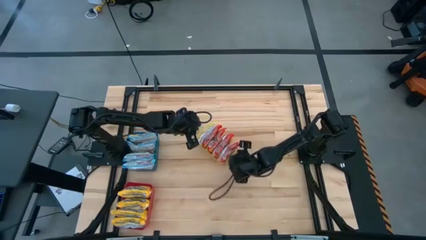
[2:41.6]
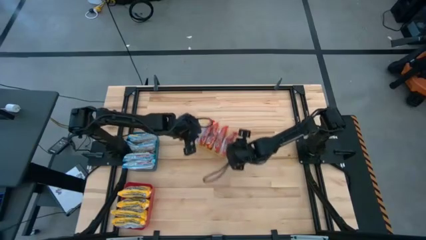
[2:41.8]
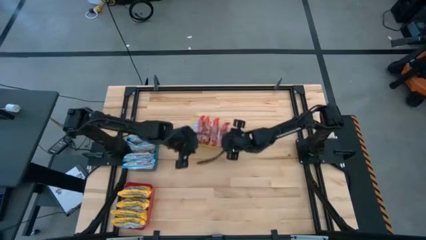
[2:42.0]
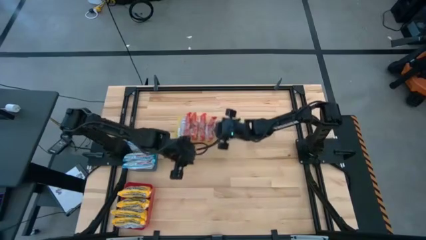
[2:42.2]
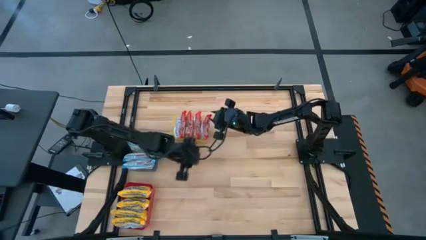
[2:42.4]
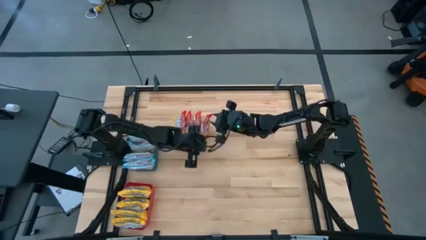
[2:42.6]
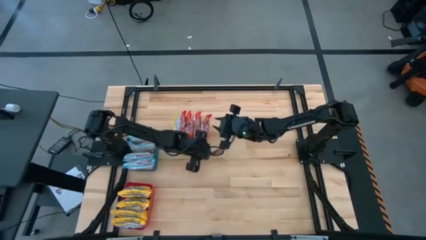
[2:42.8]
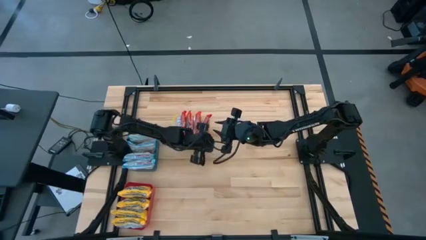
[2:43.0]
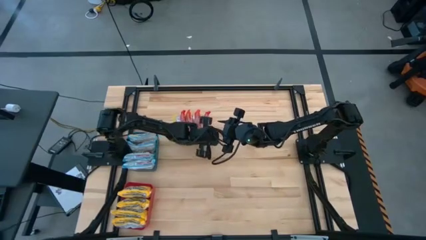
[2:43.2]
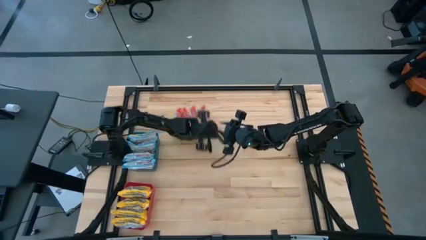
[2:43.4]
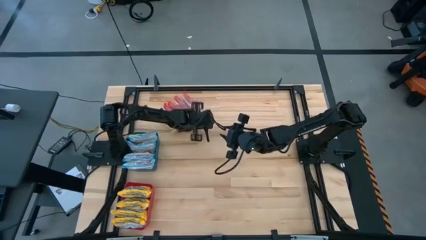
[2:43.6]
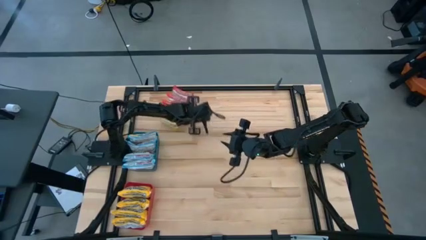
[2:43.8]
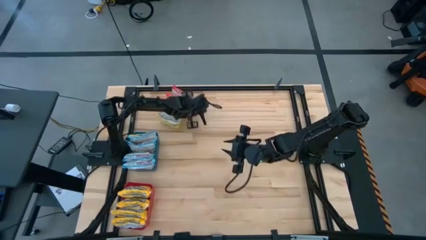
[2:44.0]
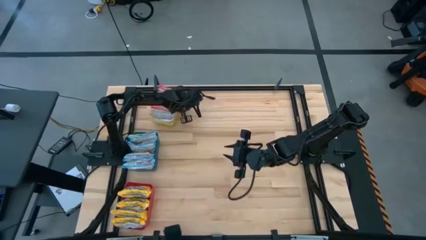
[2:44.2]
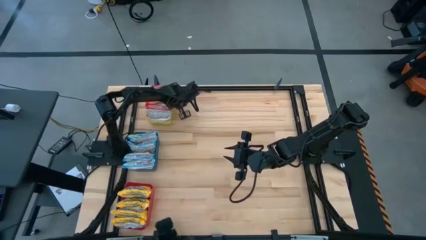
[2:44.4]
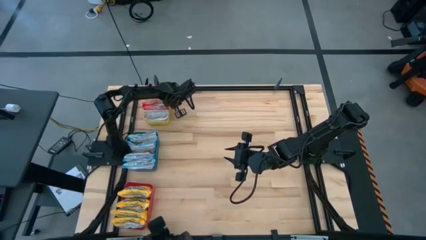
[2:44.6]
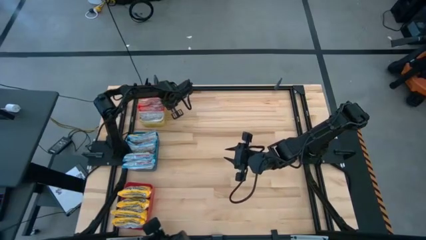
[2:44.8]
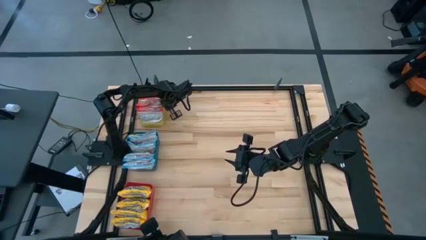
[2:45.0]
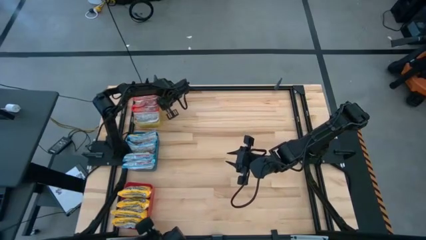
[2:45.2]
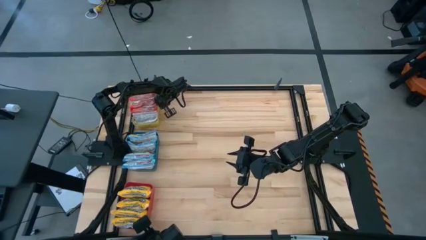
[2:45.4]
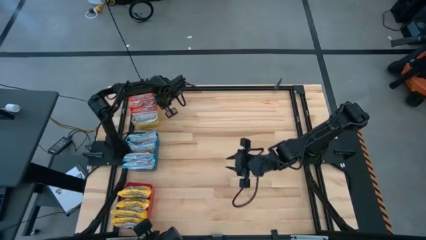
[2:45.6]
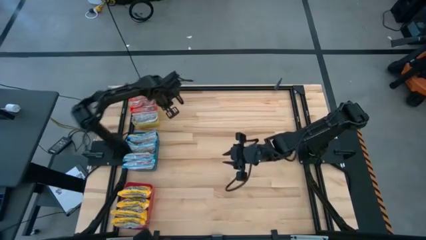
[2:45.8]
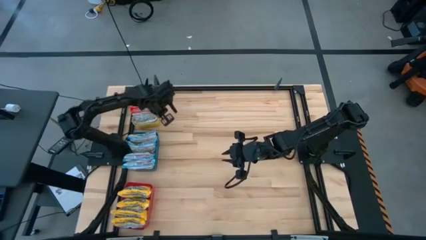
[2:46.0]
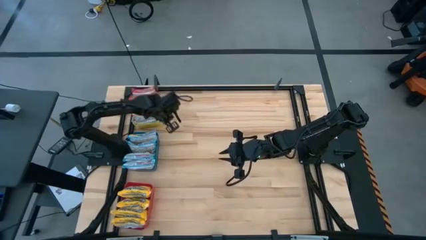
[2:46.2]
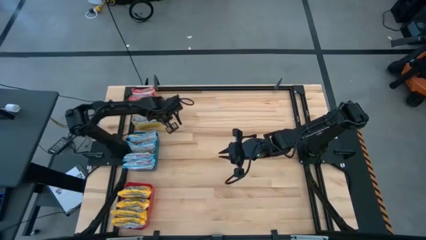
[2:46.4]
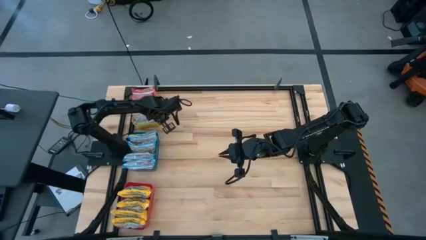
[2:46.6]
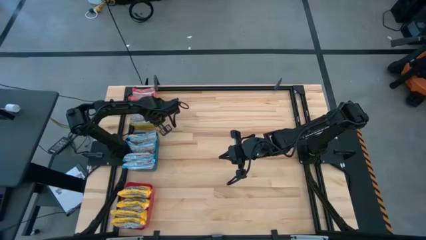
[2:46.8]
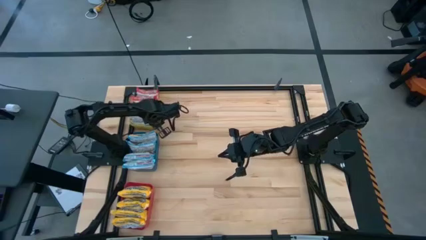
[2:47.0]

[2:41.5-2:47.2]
Task: Sort Maruchan noodles
Move the yellow bin to the top left

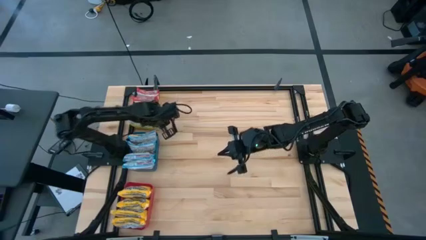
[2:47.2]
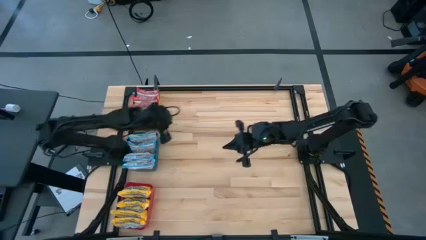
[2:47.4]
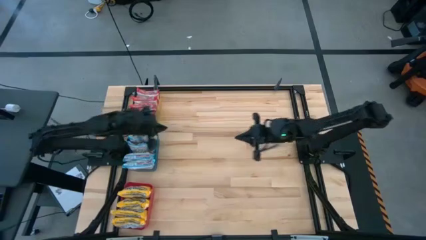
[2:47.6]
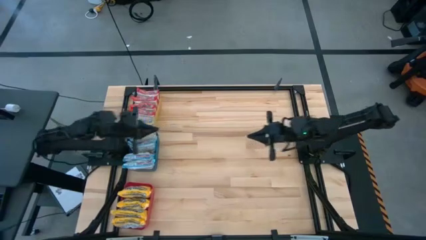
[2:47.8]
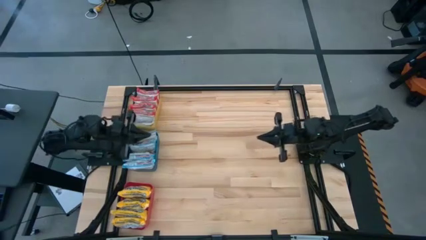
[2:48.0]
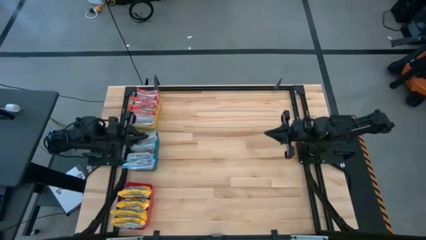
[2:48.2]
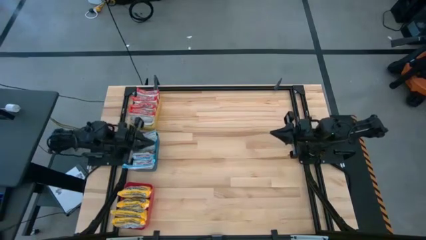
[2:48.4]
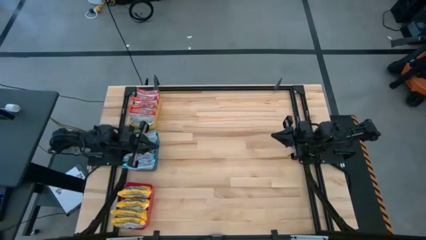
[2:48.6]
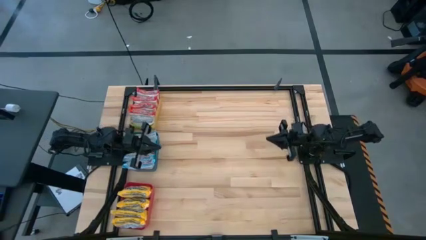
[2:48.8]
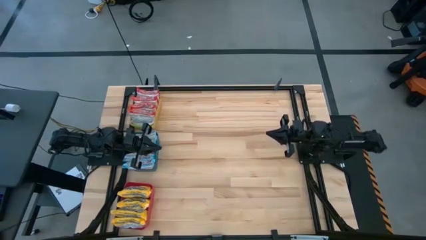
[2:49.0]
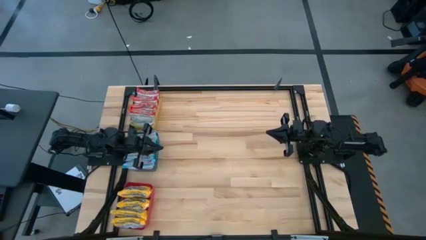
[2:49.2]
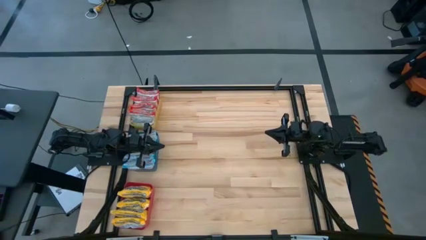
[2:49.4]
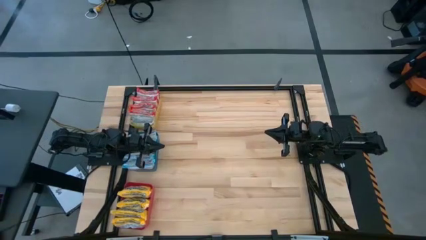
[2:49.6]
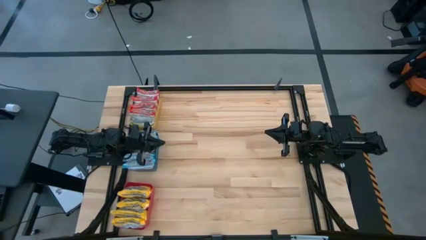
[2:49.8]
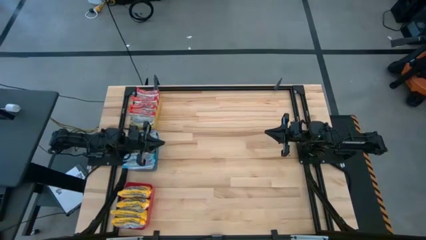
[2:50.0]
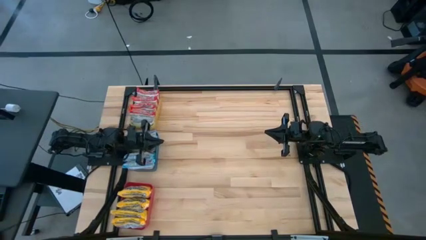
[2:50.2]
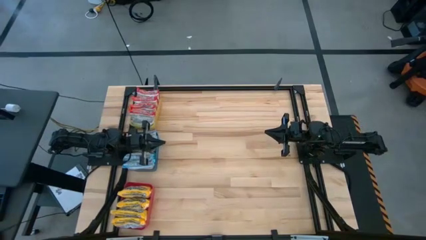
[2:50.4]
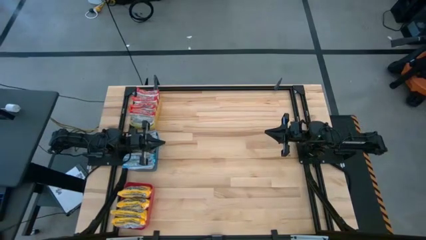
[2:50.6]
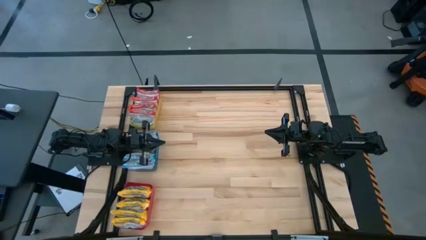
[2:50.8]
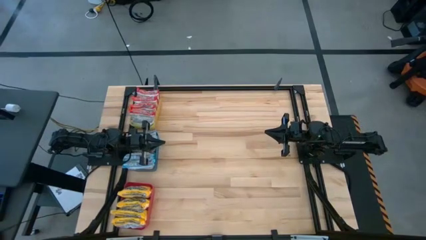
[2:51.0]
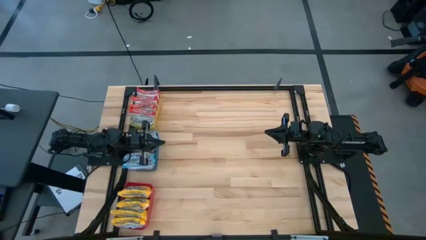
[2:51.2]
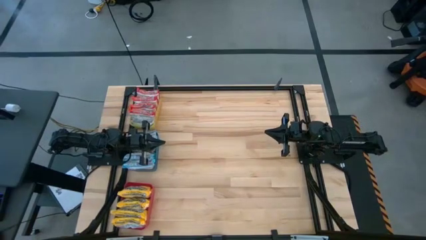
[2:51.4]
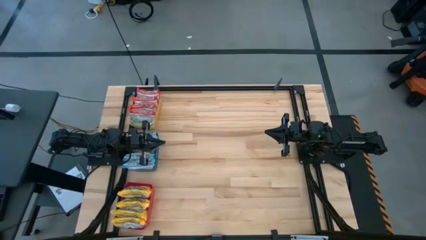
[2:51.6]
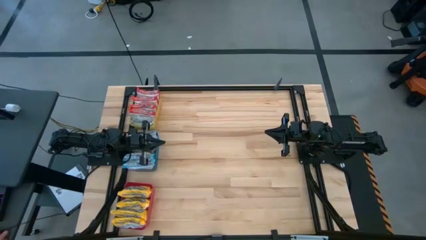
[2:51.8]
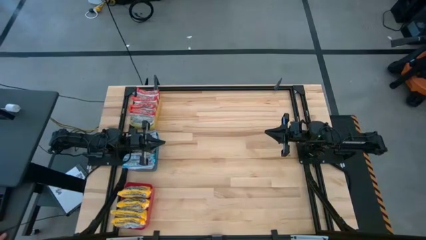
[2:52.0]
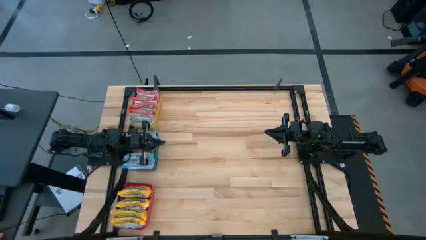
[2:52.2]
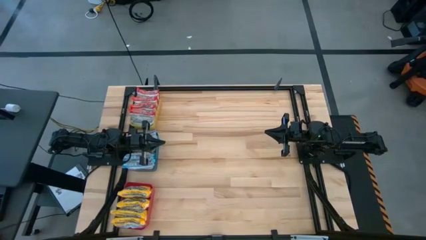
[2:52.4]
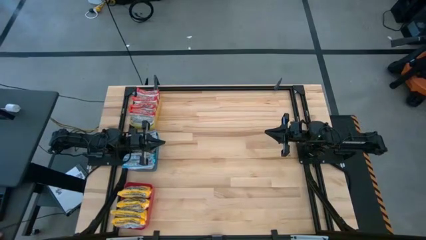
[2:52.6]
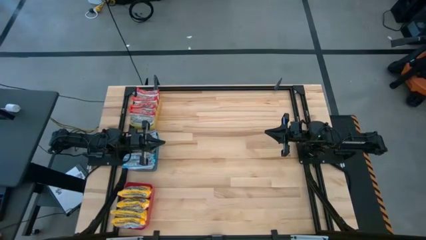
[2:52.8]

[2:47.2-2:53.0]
Return to Home Position

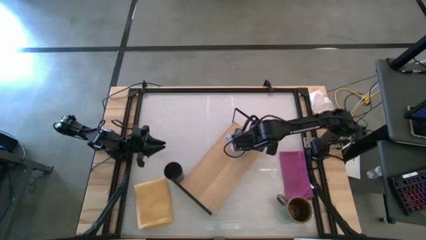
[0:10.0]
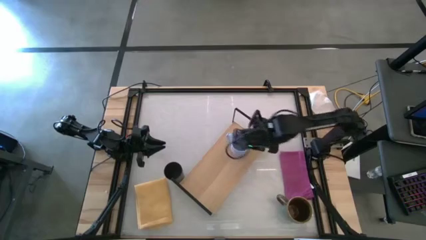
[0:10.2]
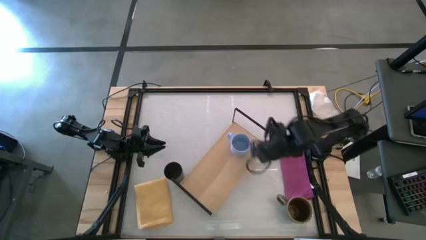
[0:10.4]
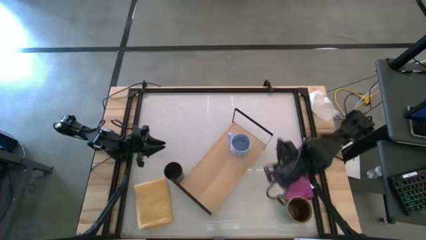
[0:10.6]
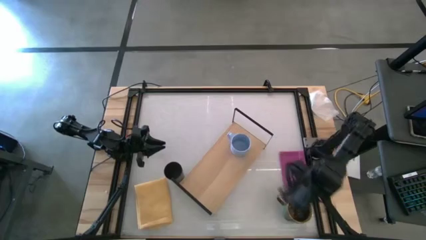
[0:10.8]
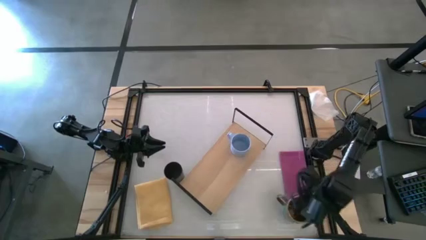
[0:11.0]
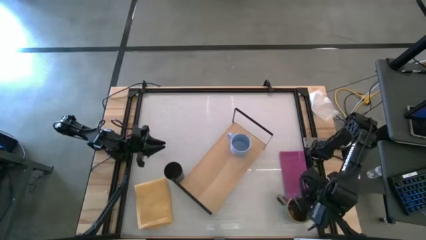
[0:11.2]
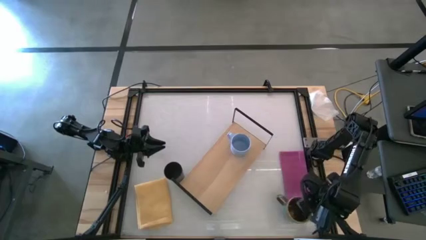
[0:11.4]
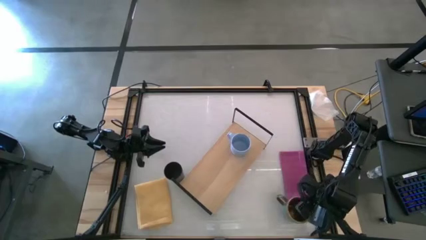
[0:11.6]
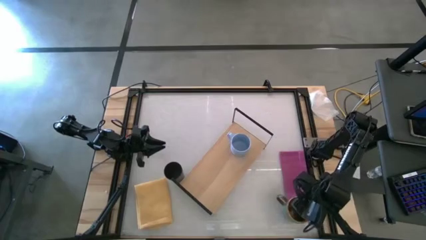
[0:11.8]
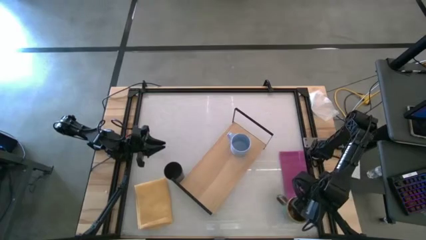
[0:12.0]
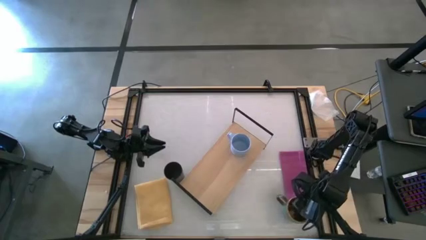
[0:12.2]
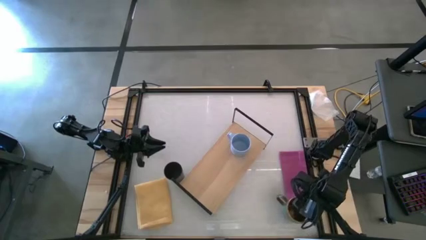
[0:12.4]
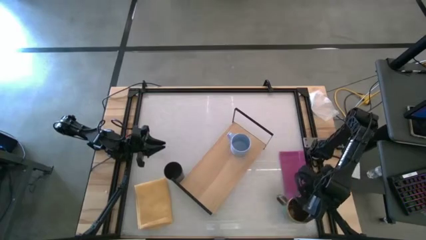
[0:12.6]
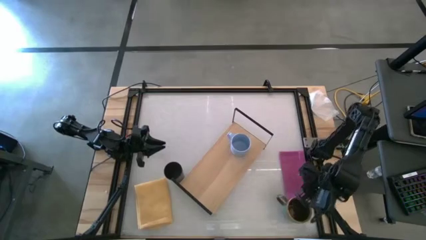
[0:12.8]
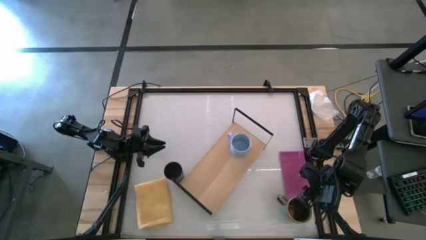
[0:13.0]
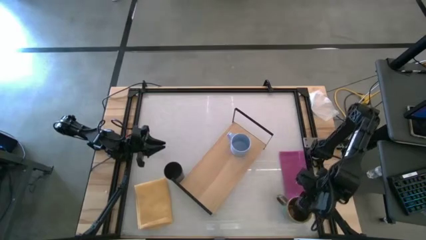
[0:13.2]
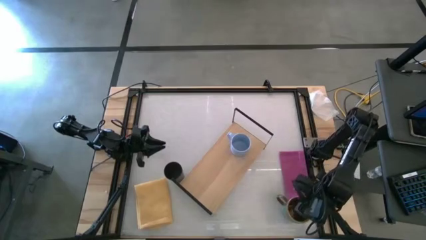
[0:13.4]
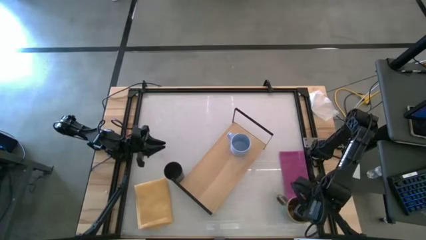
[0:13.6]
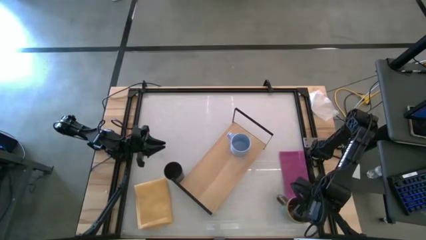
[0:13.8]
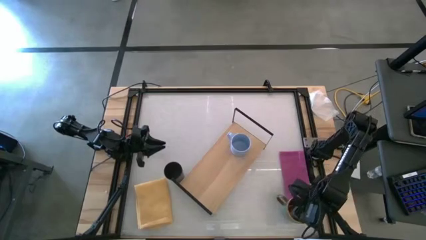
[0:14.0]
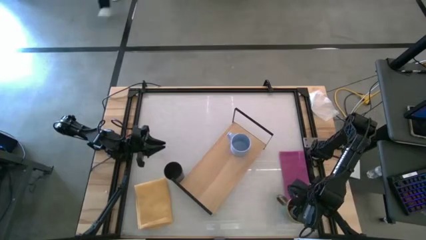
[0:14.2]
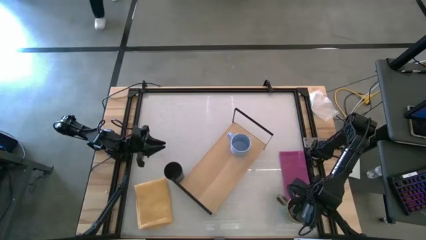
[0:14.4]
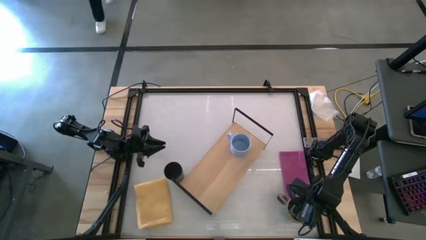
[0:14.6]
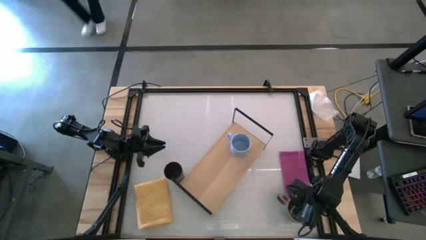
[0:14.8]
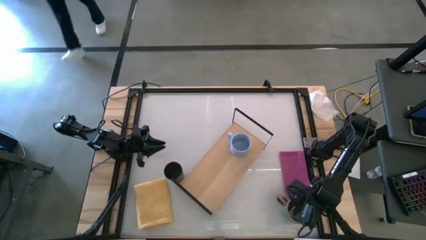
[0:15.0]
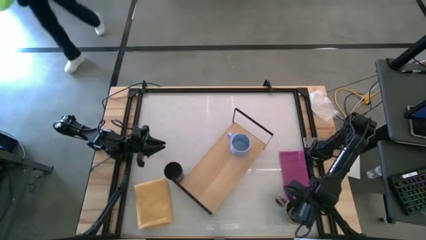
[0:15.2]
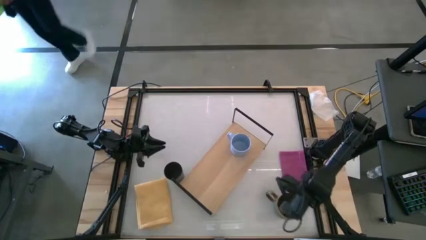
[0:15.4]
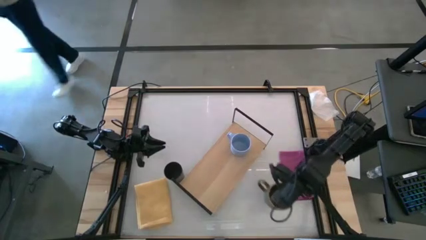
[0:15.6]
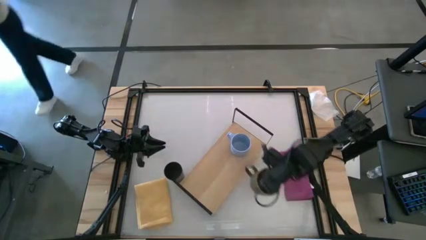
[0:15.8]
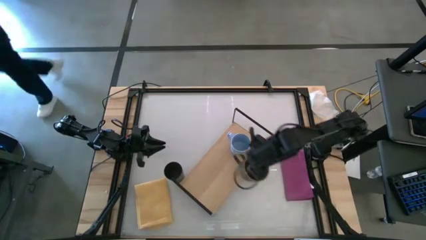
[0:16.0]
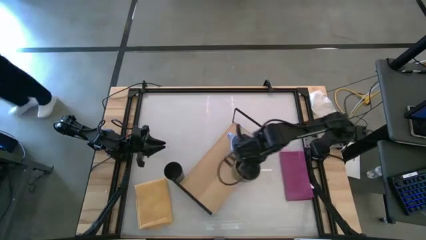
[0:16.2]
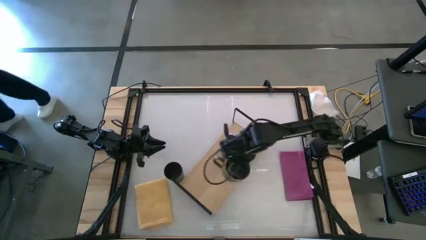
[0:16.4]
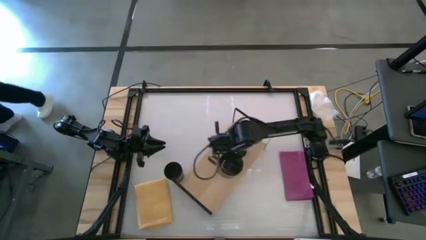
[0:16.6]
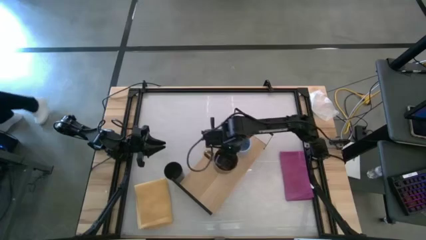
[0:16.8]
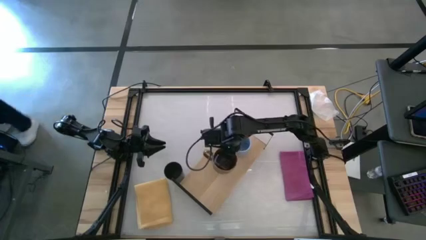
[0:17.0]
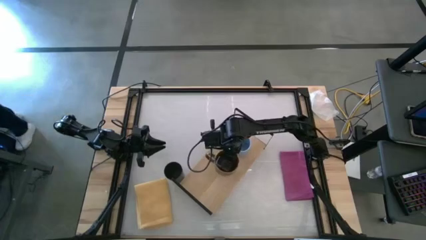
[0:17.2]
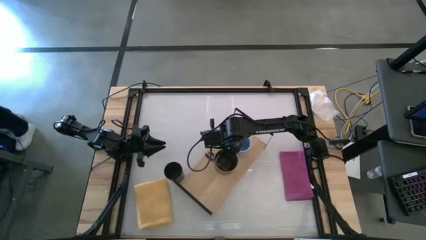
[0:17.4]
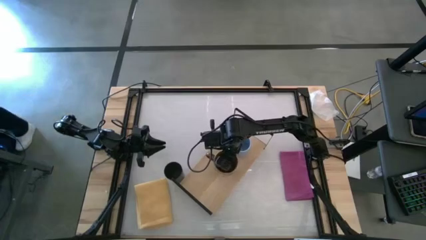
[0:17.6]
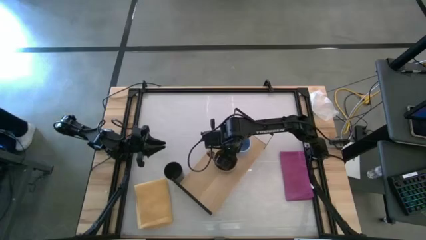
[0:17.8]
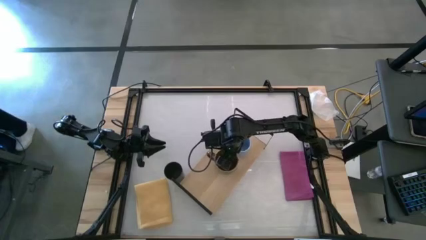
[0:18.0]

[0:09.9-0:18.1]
Task: Stack small to large cups/mugs on shelf
Put the brown mug on the shelf
